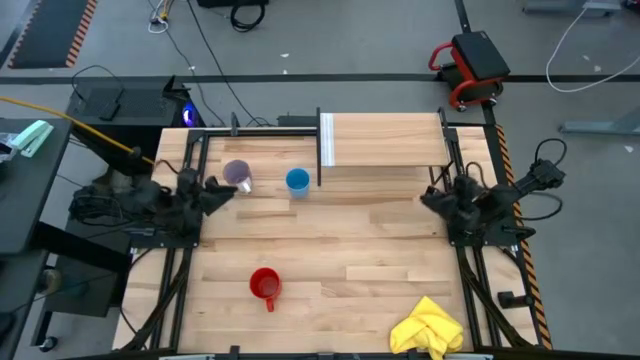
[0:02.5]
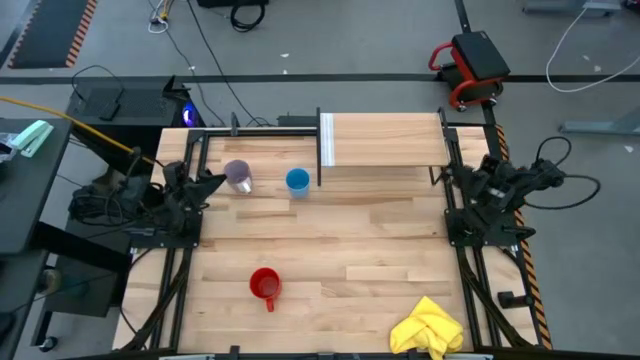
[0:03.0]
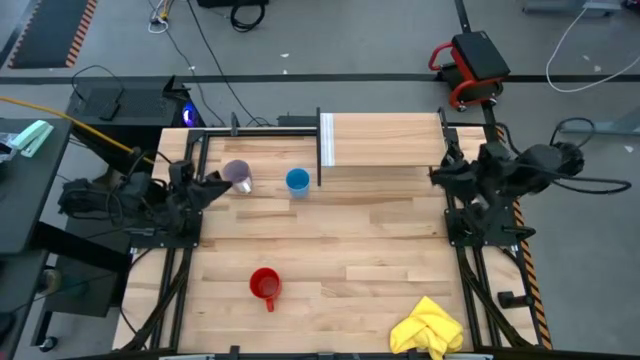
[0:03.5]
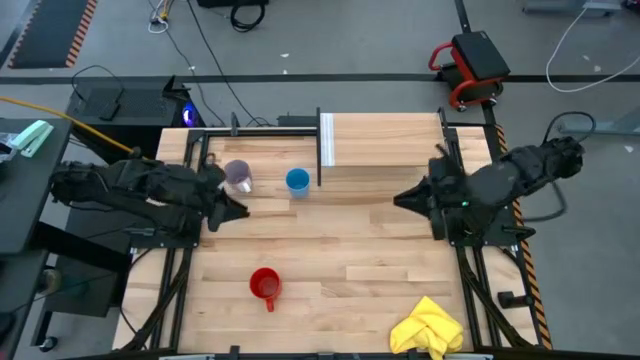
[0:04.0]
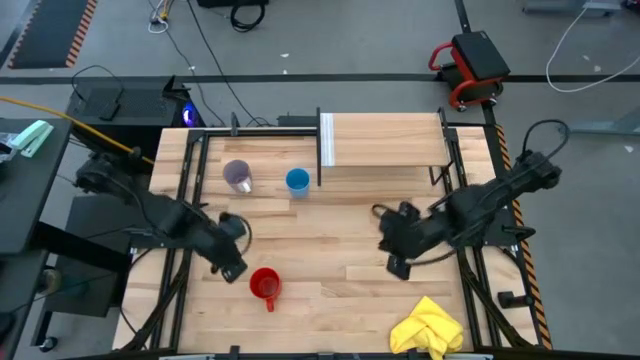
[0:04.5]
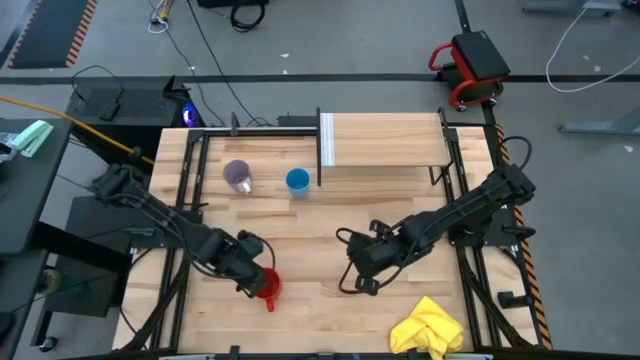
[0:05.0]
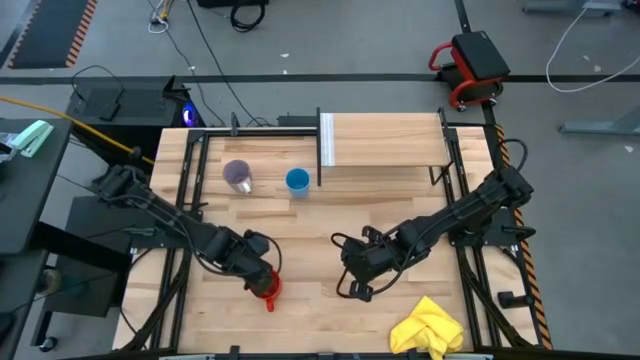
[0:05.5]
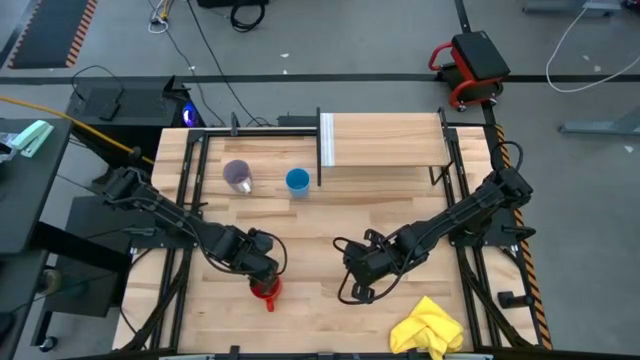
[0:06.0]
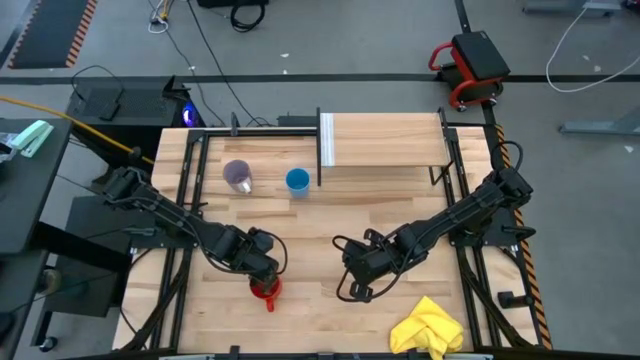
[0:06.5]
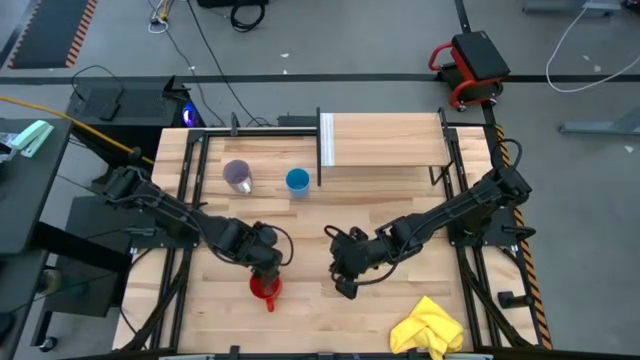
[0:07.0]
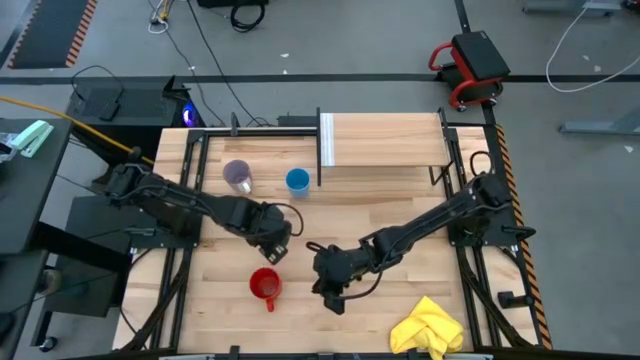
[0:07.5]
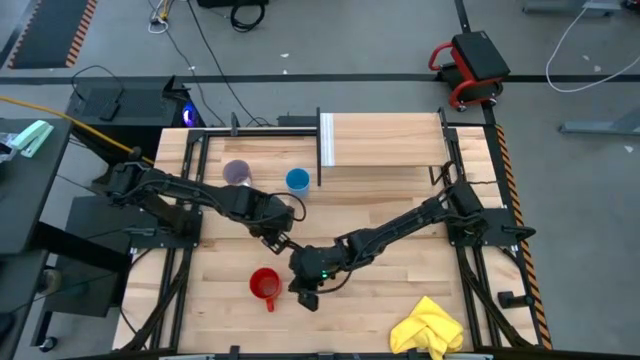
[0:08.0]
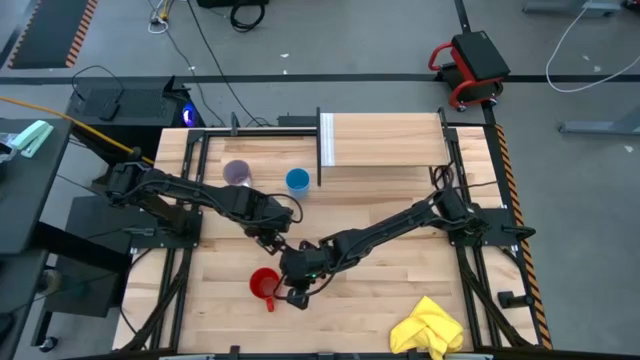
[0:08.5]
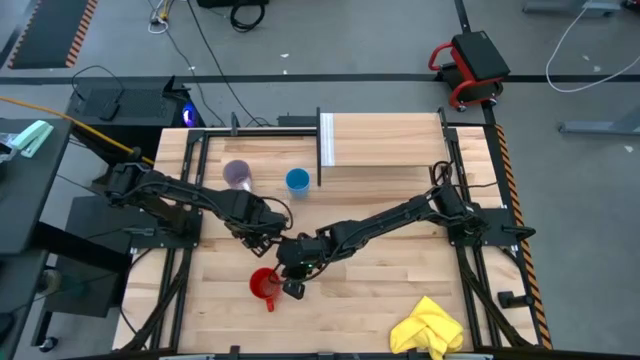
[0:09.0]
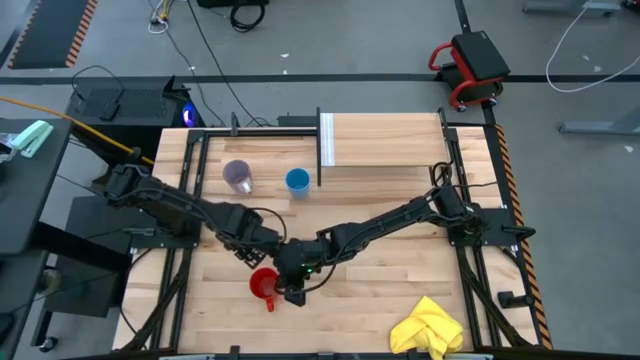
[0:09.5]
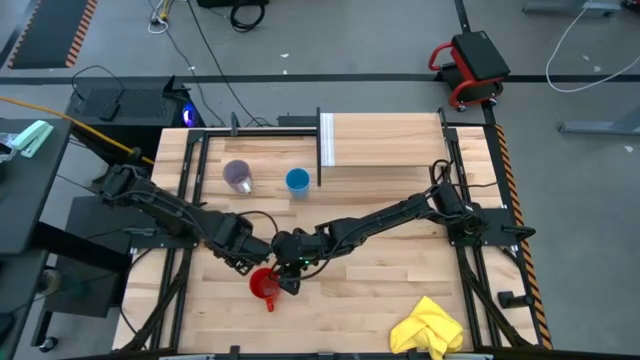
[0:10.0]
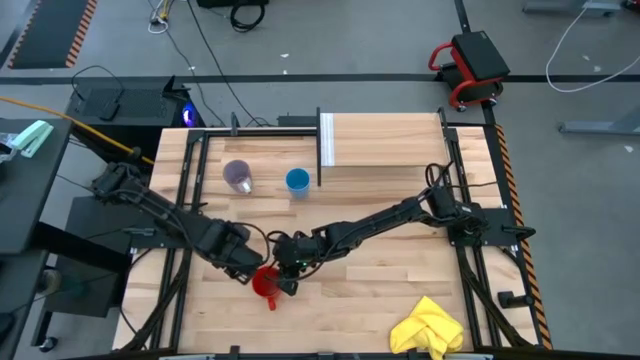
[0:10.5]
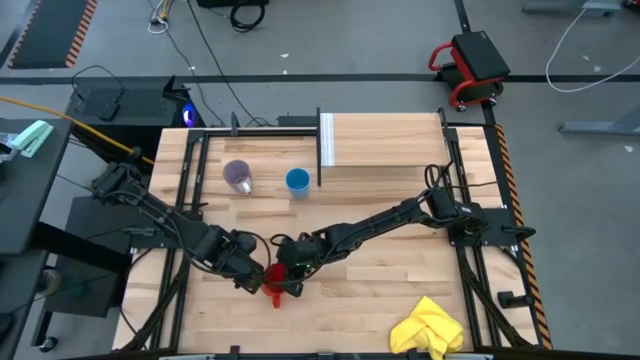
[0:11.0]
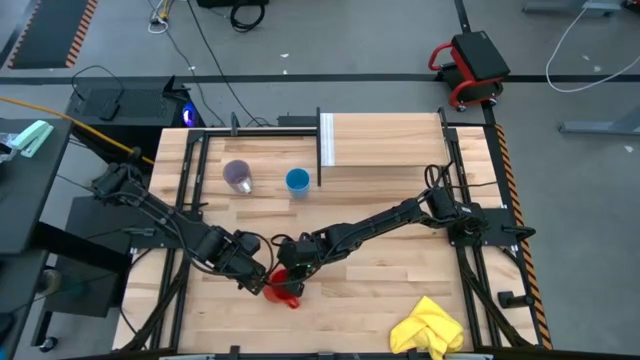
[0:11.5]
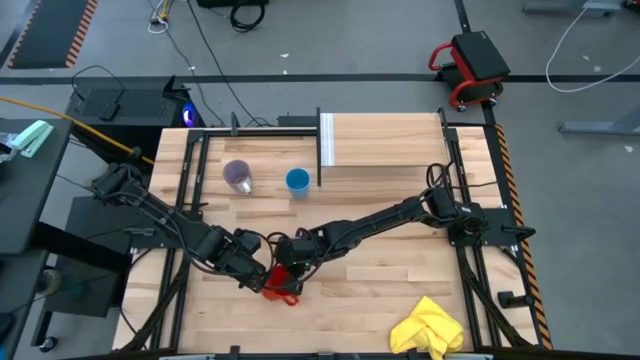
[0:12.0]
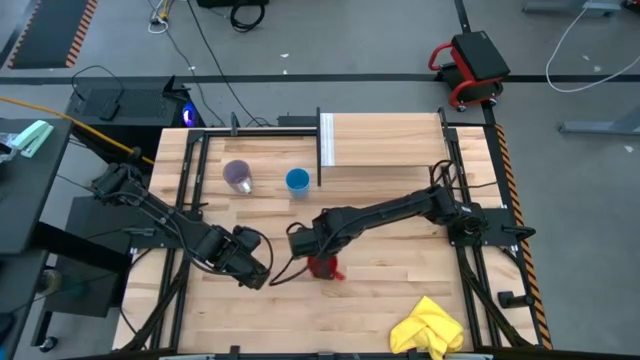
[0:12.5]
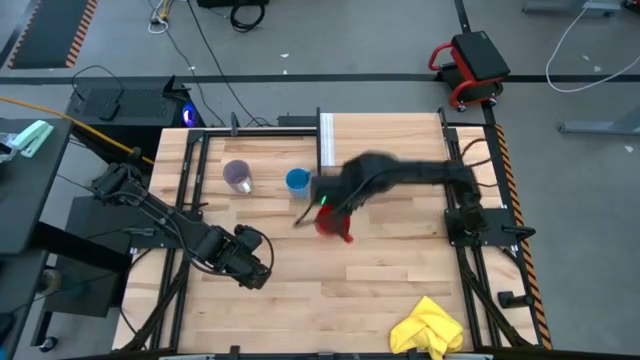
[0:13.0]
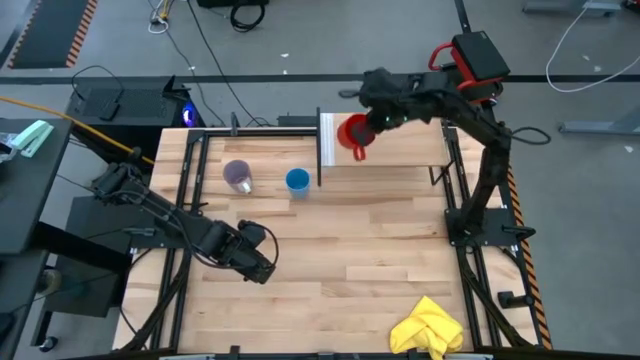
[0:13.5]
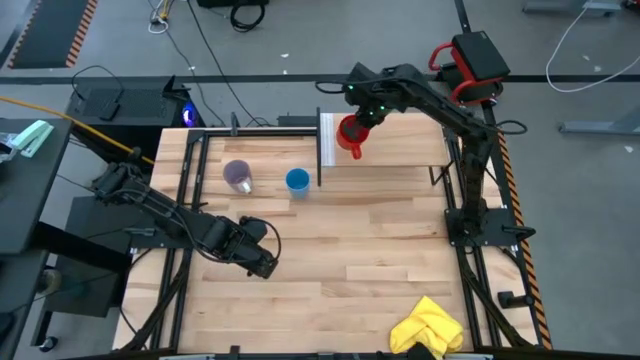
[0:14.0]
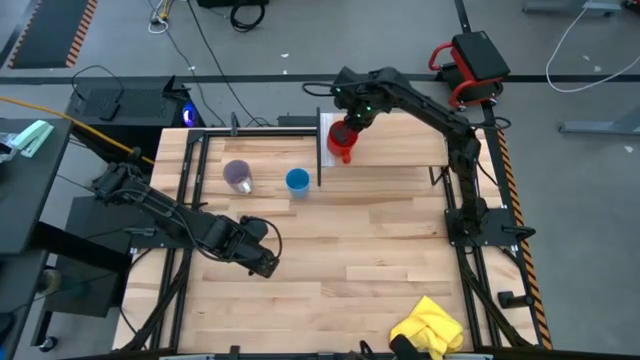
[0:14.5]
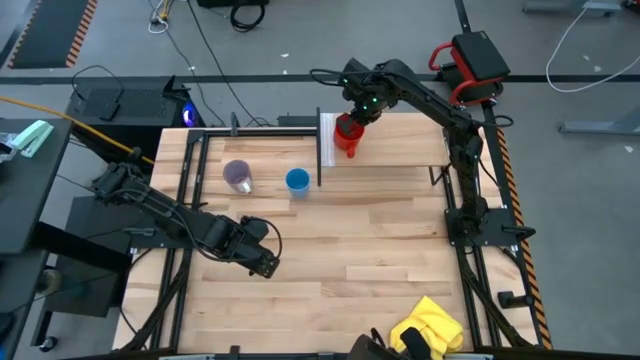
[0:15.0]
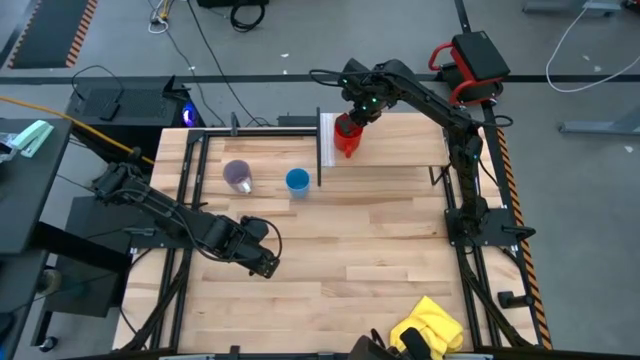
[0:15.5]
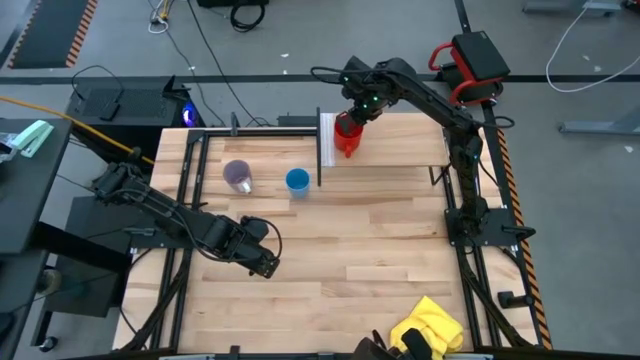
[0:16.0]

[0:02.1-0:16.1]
Task: Stack small to large cups/mugs on shelf
Put the red mug on the shelf

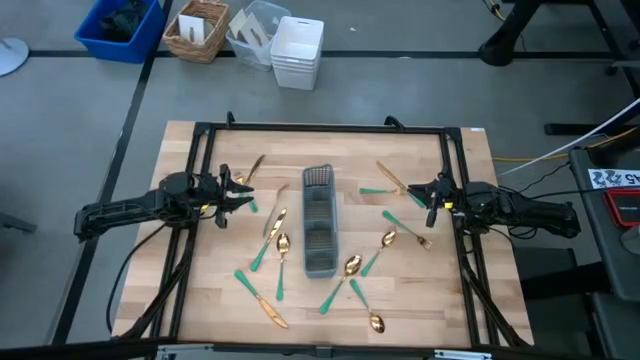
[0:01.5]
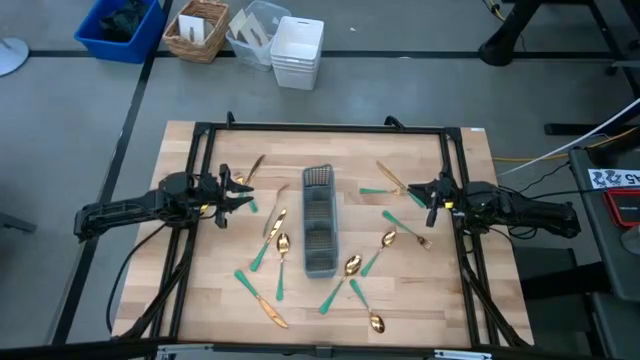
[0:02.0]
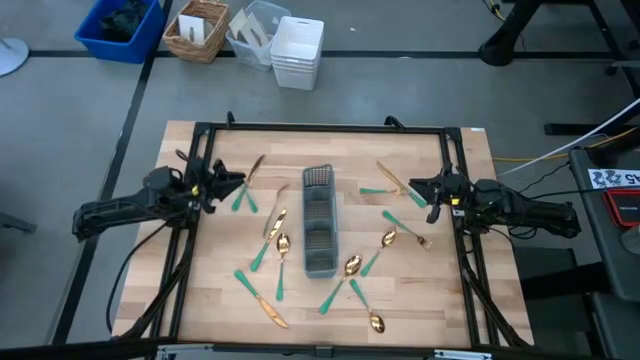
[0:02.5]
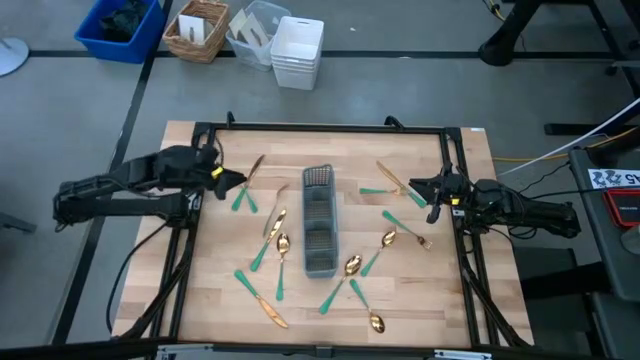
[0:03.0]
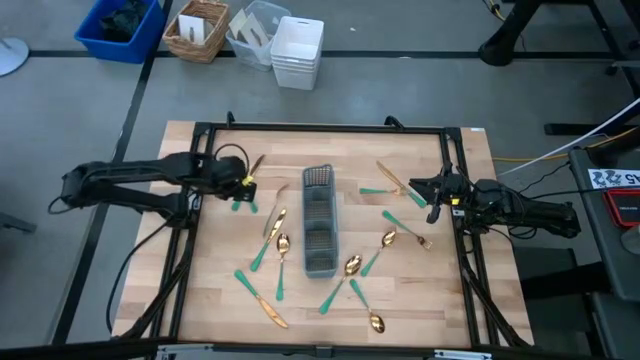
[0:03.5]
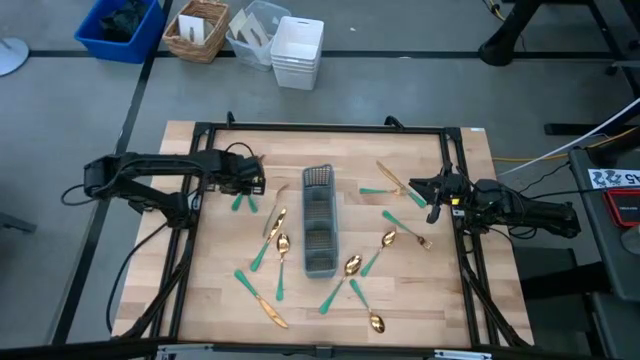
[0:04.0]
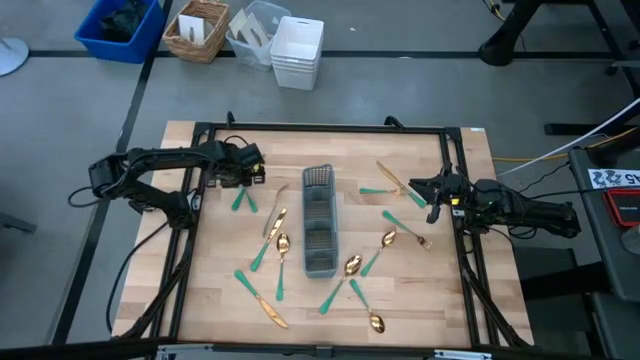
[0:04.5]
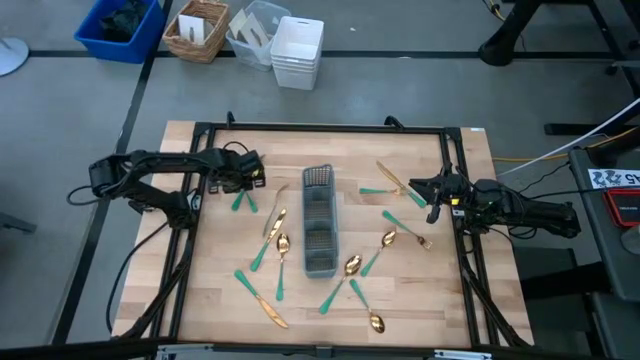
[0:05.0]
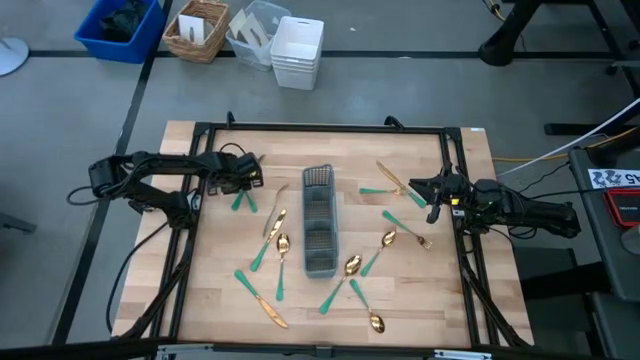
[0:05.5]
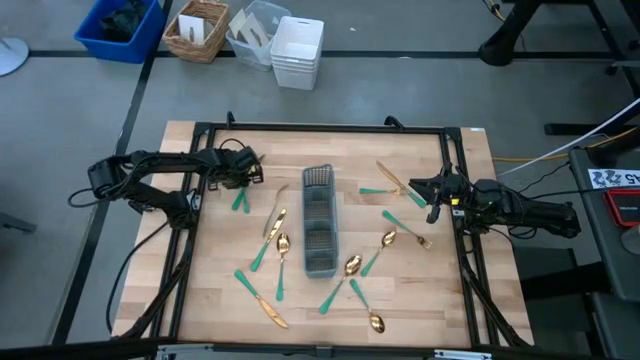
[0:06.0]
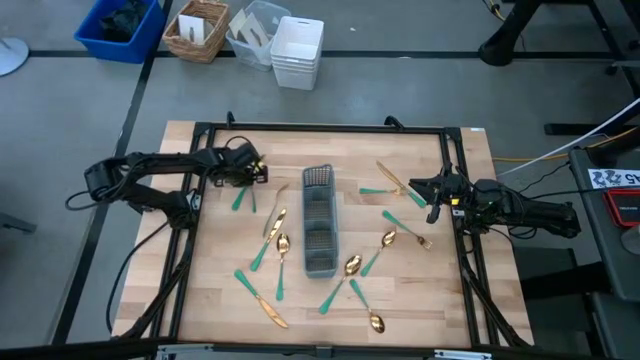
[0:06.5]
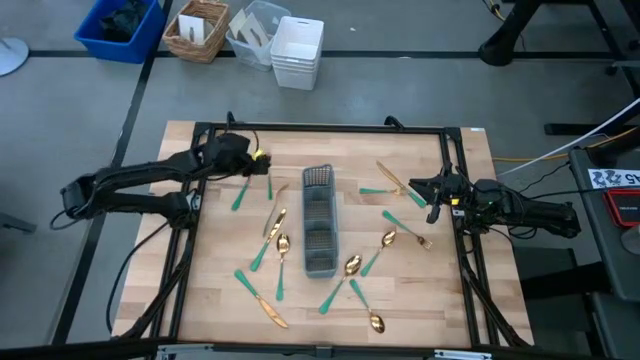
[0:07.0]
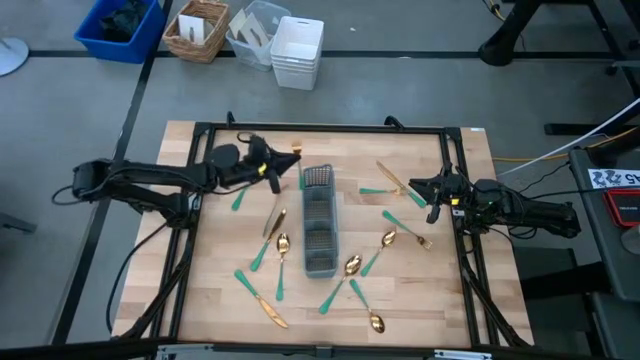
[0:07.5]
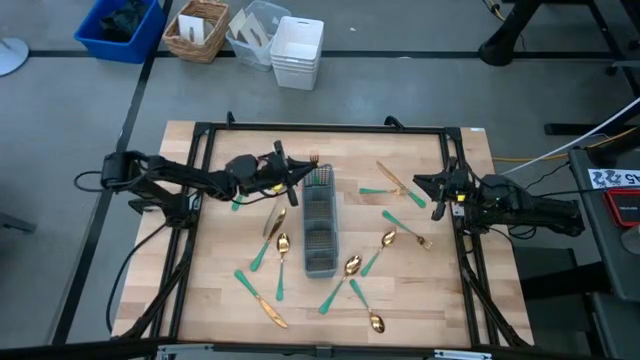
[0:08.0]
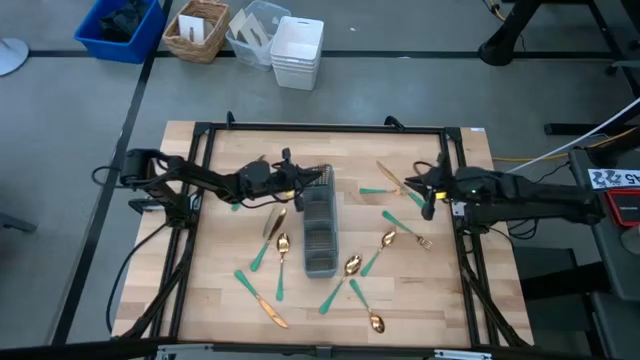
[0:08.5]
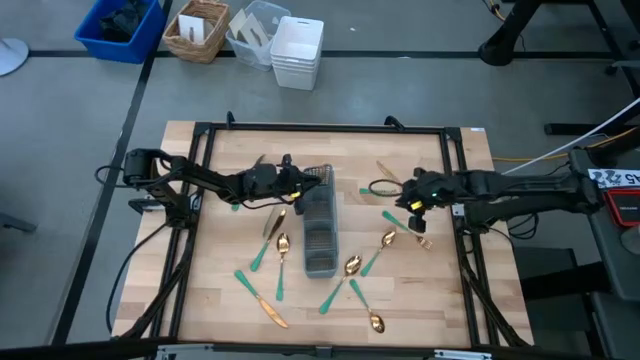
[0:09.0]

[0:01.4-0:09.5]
Task: Sort silverware
Put the green fork into the utensil rack
